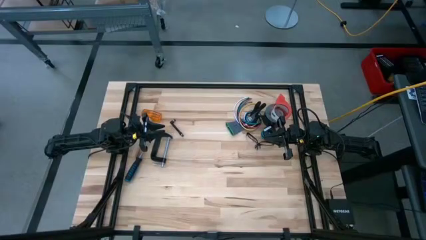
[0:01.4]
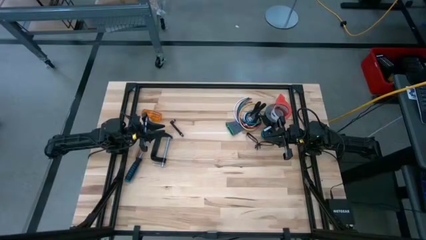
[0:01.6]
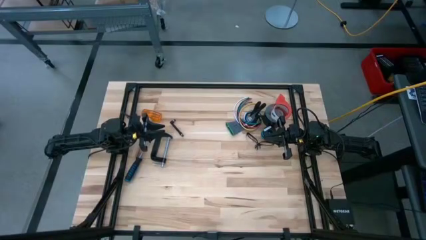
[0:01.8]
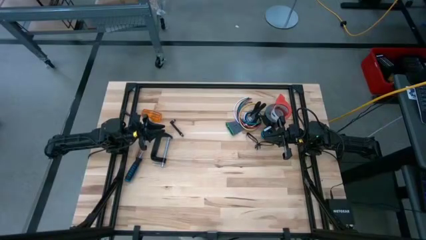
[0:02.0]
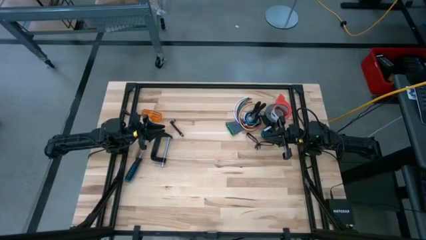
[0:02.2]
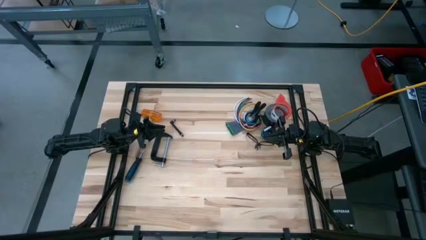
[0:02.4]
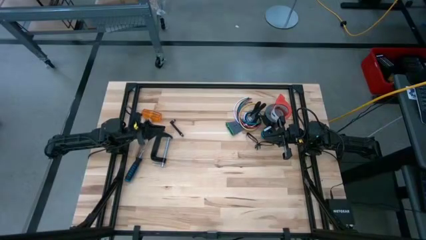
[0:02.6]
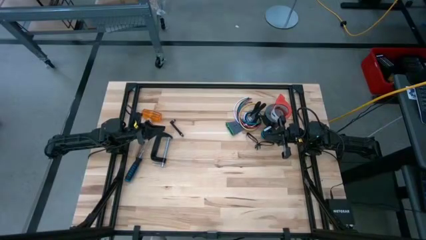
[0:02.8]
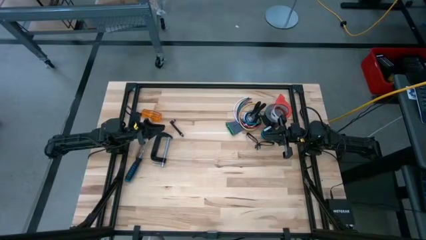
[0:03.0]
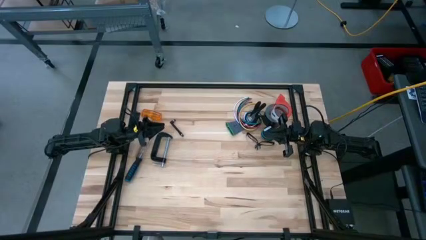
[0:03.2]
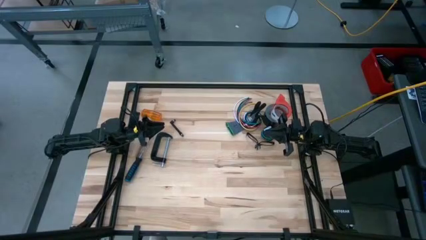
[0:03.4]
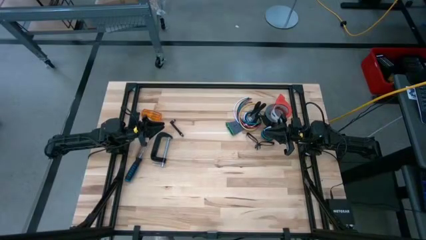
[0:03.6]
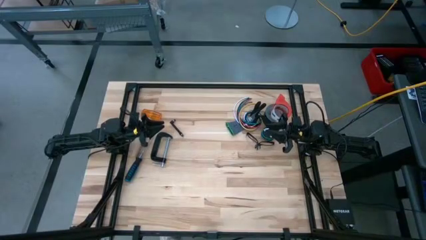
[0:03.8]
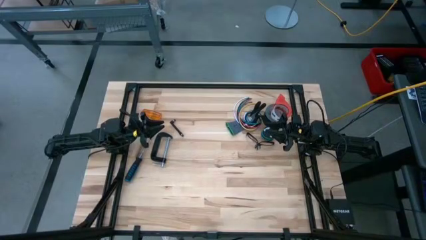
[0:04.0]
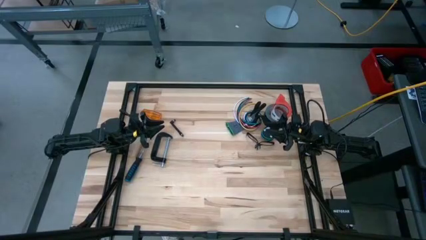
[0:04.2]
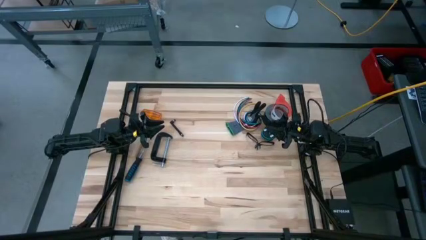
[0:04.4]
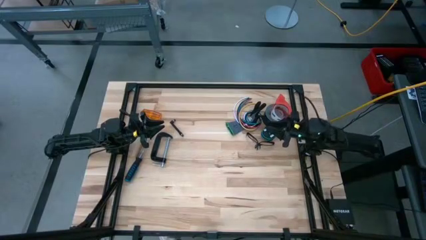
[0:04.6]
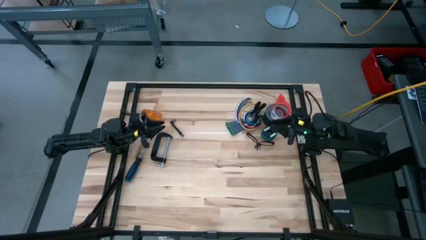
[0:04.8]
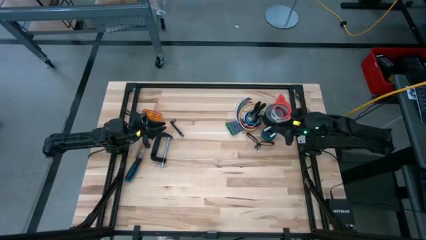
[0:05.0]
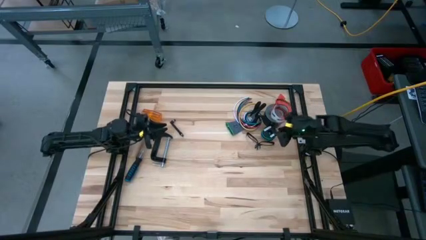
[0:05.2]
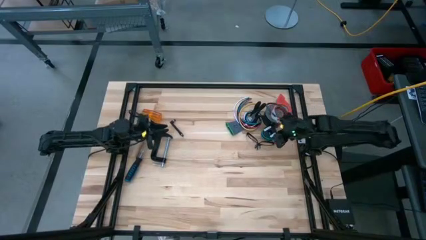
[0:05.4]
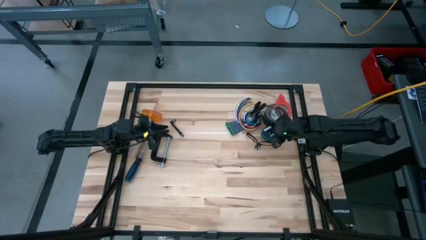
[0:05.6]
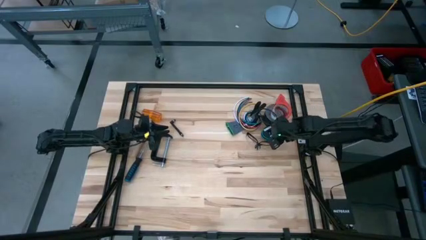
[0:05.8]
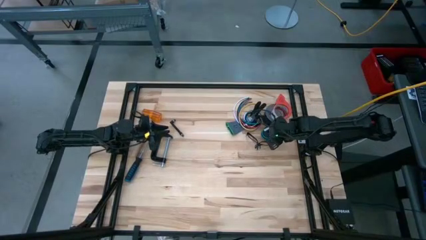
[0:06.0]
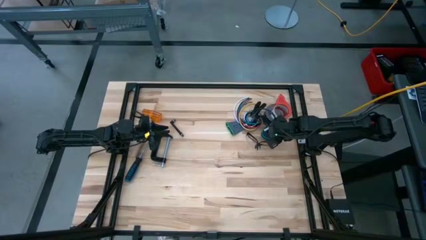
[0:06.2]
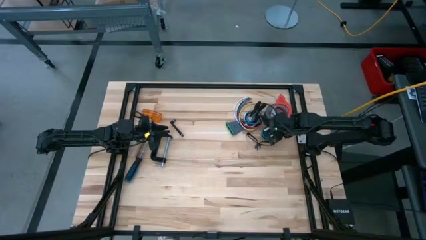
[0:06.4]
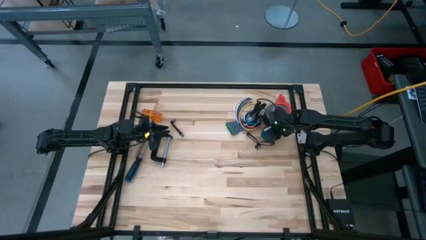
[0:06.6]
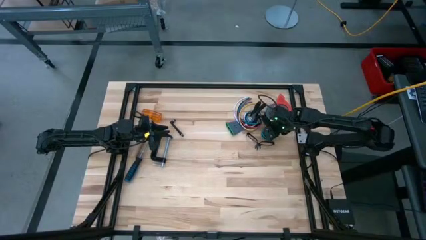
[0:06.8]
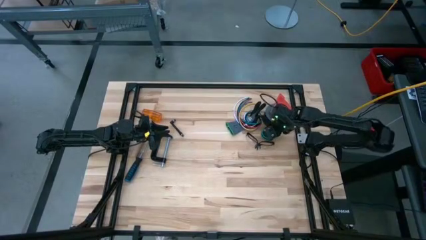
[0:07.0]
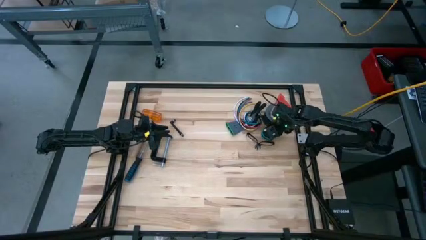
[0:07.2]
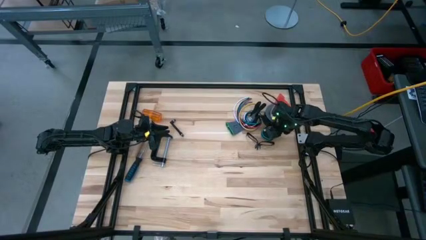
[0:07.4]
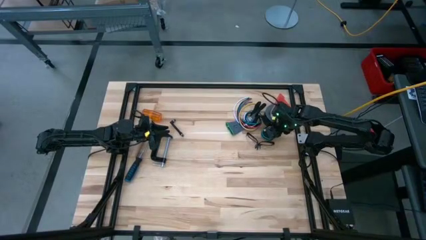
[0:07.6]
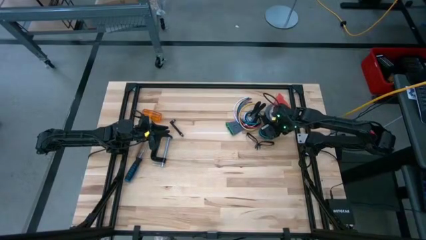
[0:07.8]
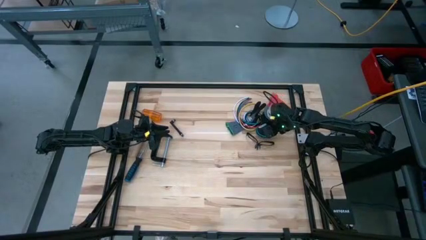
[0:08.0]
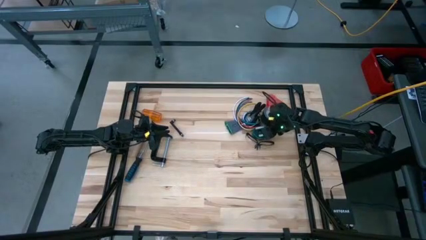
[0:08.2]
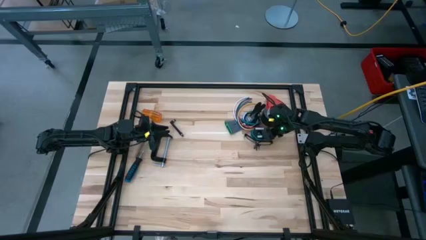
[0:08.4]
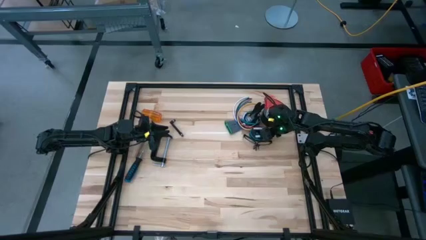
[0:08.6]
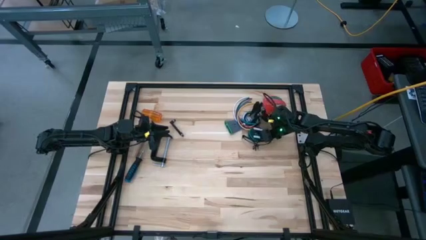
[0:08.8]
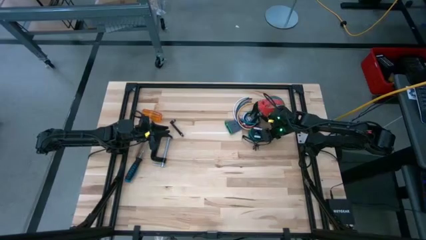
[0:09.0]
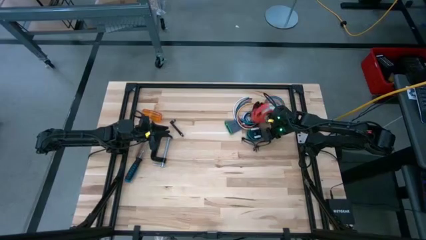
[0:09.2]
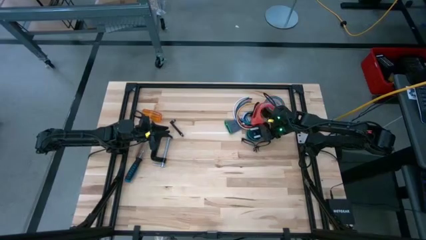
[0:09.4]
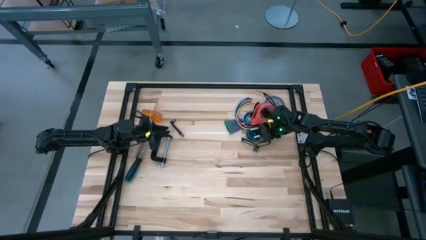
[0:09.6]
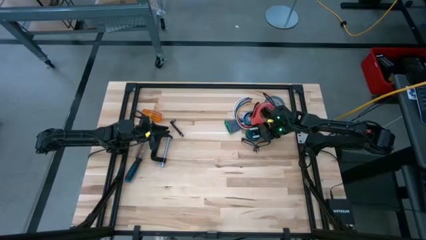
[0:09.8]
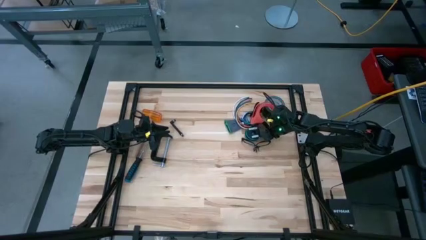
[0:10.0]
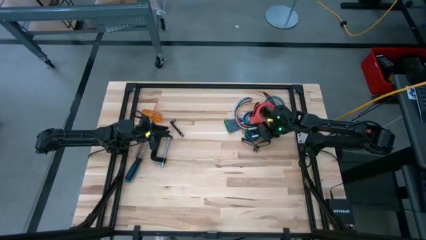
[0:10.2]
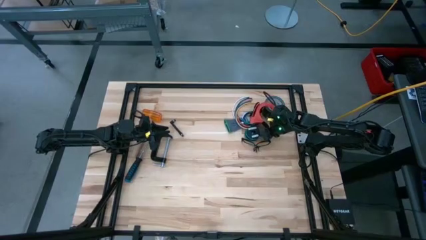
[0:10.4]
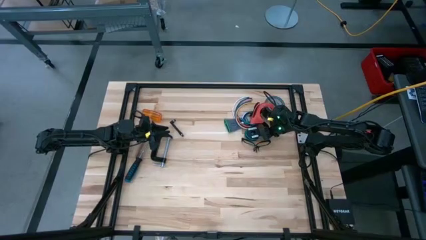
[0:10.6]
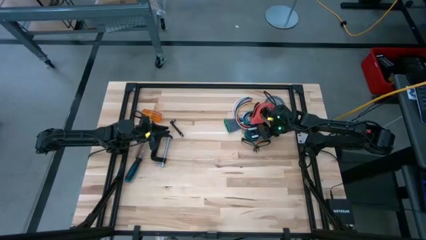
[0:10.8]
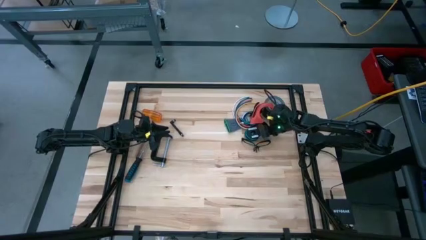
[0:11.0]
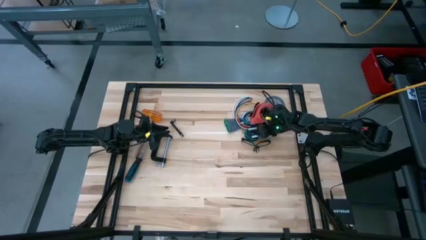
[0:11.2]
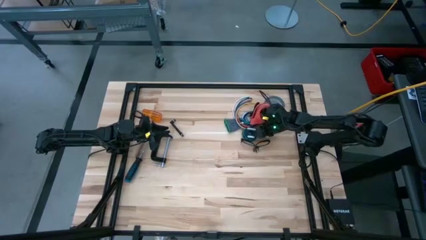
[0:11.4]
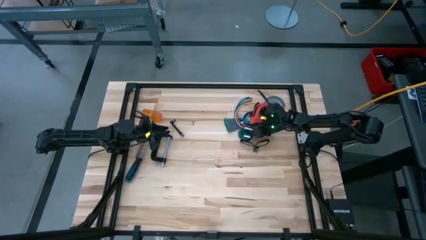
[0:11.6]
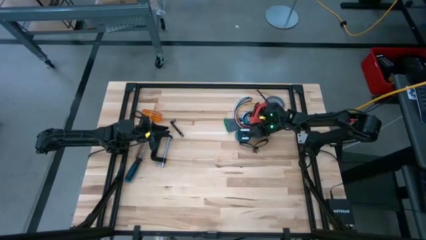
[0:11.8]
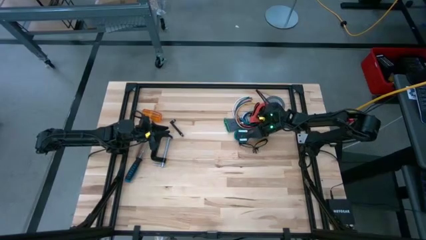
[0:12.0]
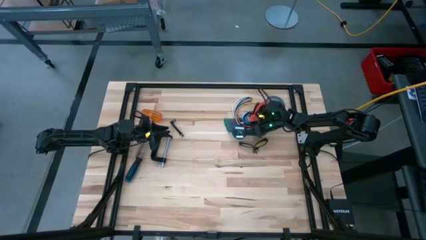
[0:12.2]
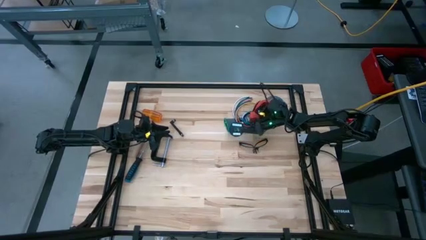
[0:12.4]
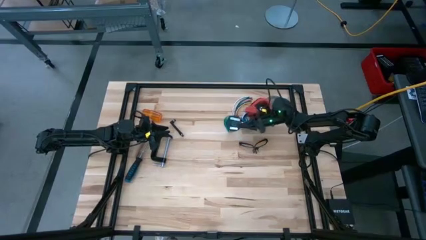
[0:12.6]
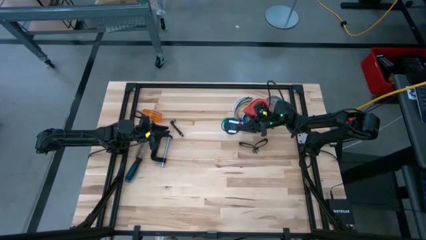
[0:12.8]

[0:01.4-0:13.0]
Task: Coil cords
Uncoil the green wire from the spool

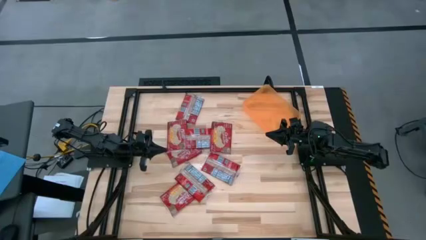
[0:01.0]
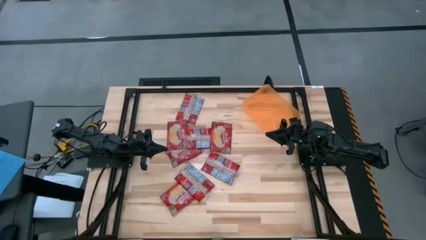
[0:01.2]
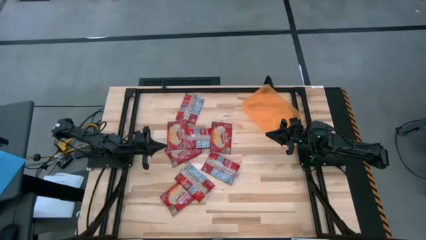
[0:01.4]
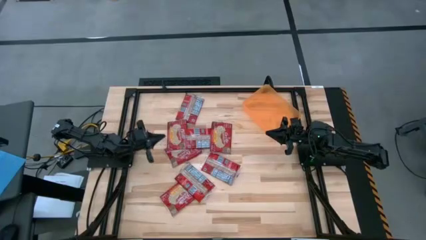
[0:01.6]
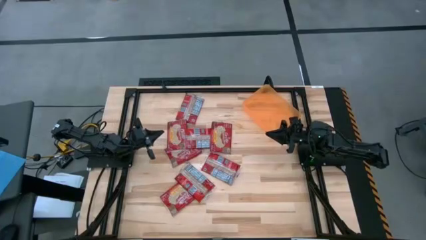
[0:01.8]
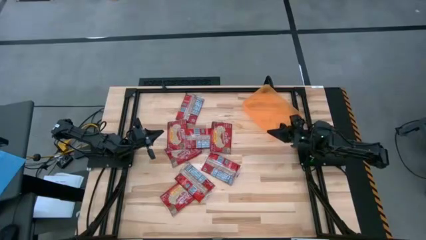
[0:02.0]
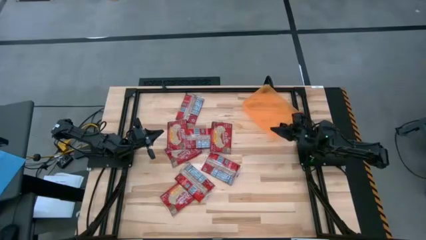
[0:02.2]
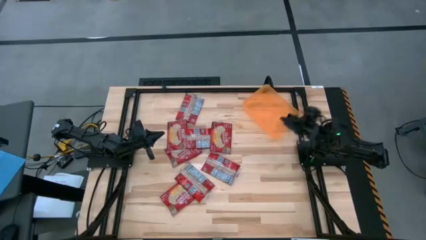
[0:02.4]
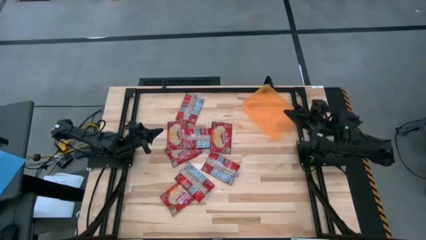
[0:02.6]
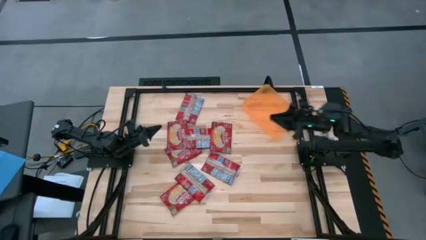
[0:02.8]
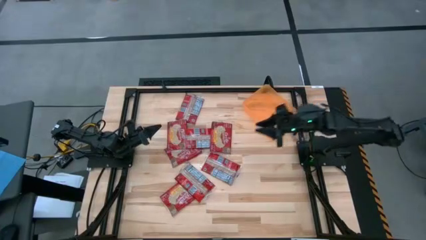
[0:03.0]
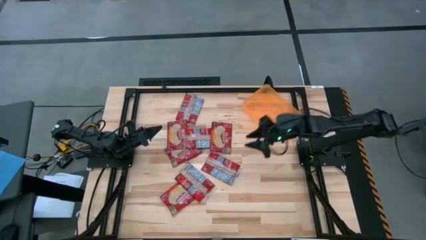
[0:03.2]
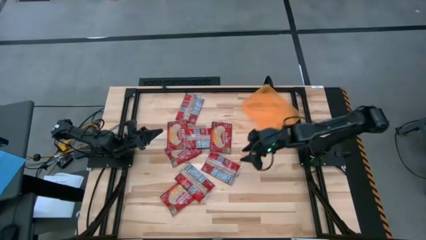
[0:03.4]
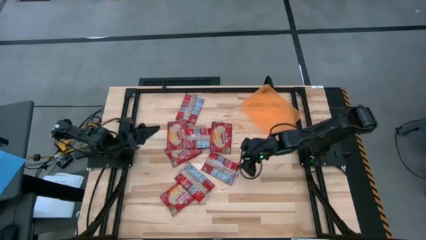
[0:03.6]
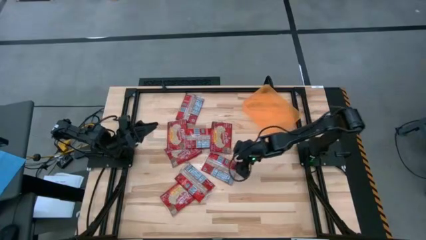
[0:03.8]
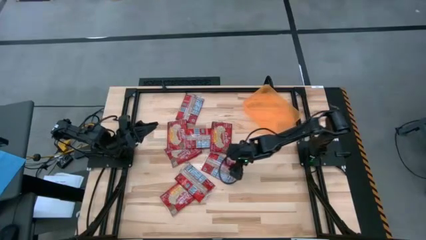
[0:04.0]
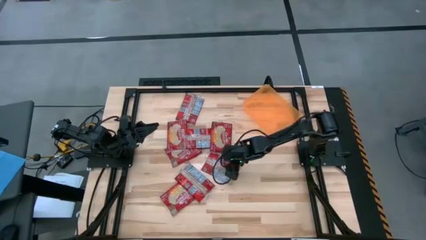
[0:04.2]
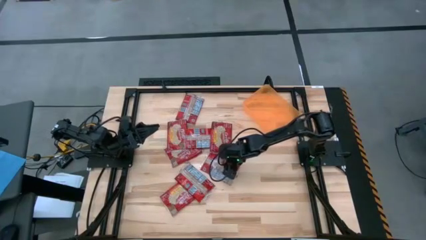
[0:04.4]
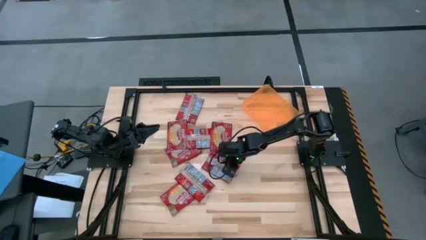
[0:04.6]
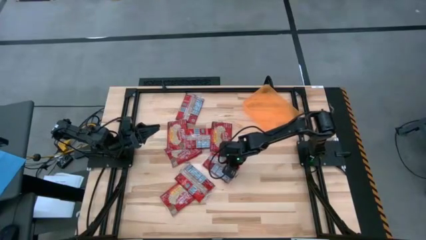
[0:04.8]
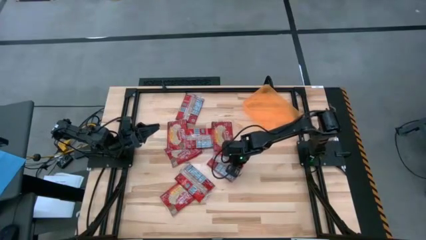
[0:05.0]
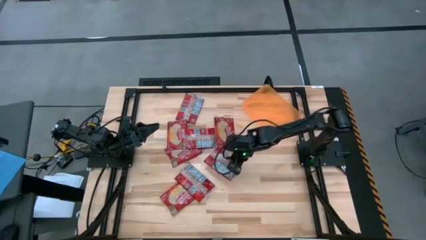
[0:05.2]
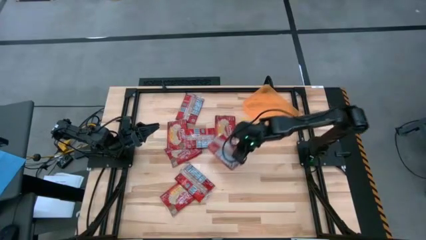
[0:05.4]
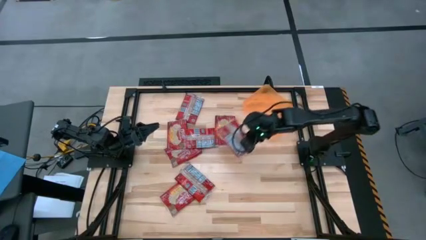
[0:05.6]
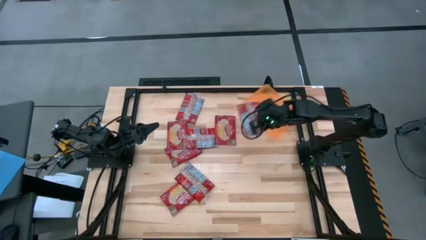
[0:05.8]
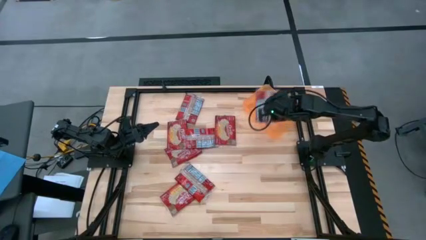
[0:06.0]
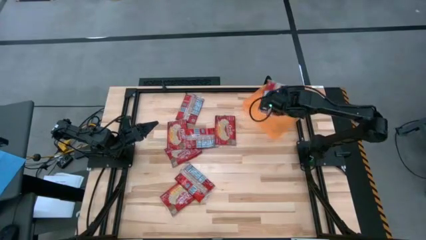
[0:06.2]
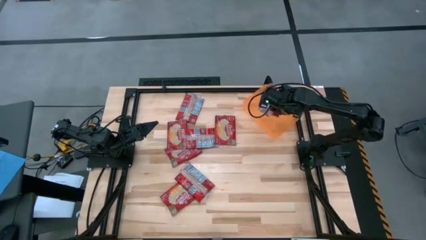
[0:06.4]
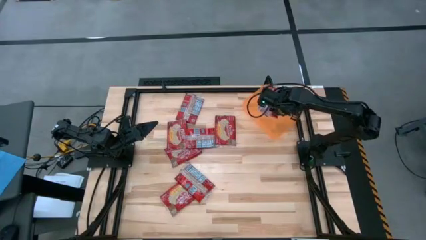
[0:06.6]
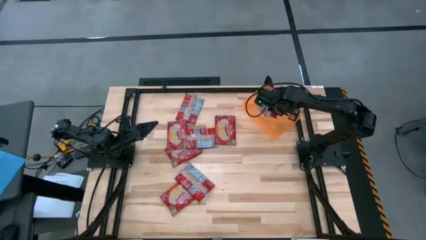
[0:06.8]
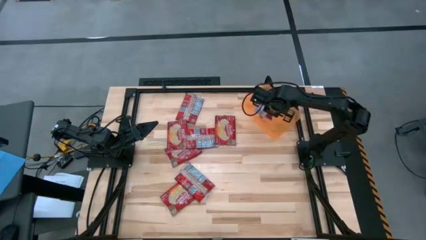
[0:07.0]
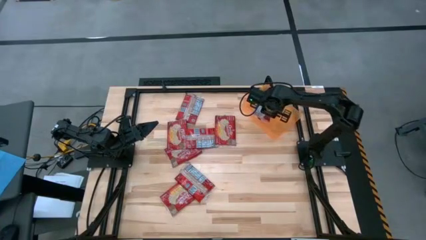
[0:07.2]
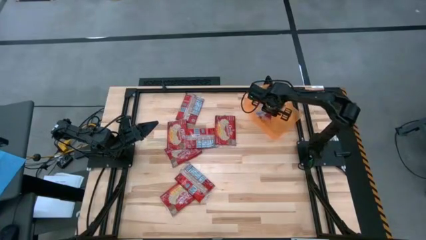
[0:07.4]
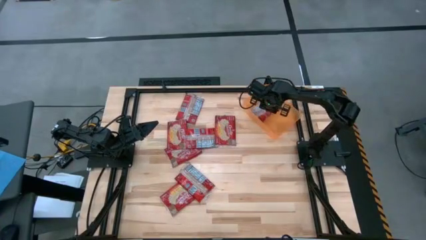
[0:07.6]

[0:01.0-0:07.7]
Task: Sort popcorn bags into baskets
Put the red popcorn bag into the orange bin
